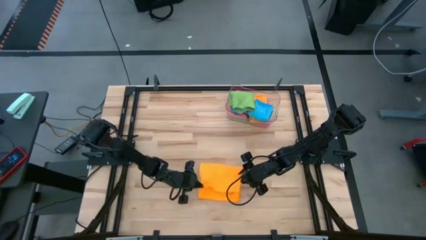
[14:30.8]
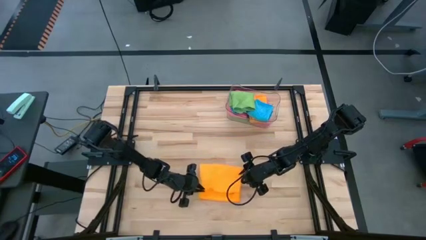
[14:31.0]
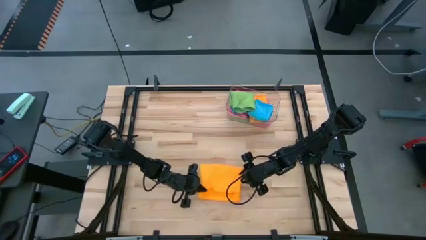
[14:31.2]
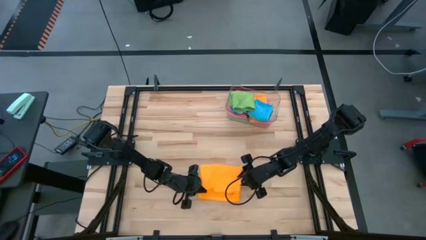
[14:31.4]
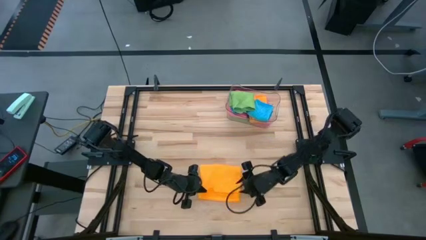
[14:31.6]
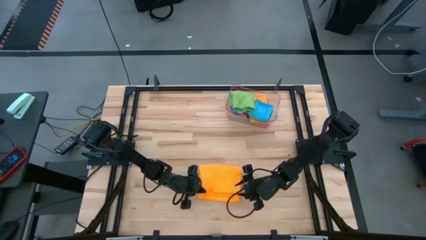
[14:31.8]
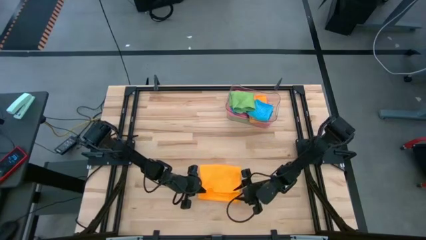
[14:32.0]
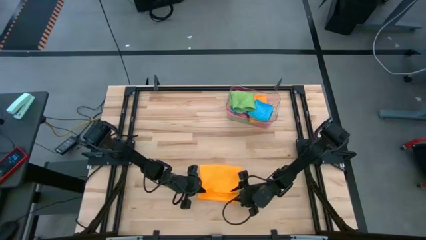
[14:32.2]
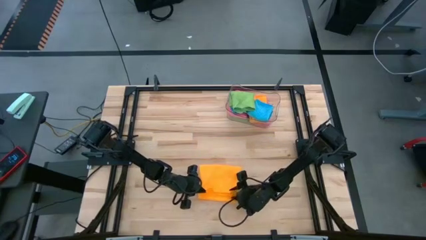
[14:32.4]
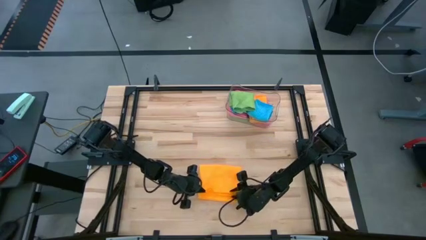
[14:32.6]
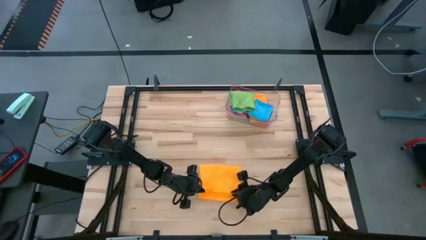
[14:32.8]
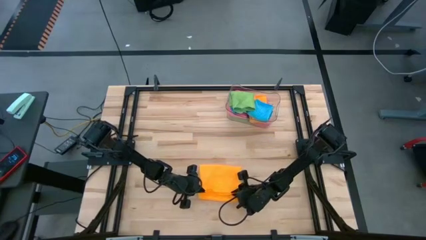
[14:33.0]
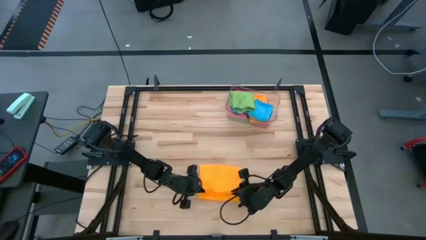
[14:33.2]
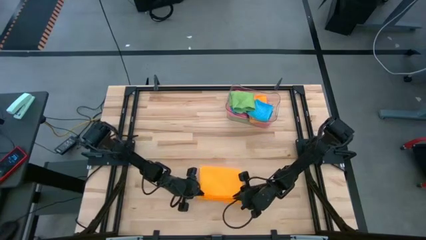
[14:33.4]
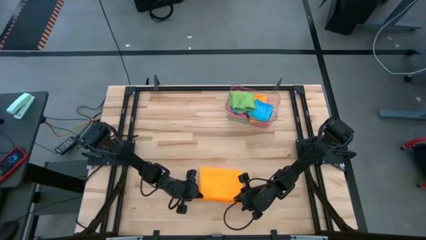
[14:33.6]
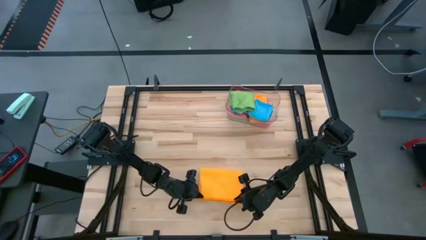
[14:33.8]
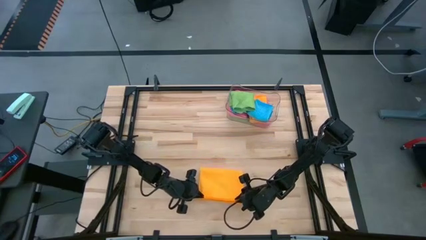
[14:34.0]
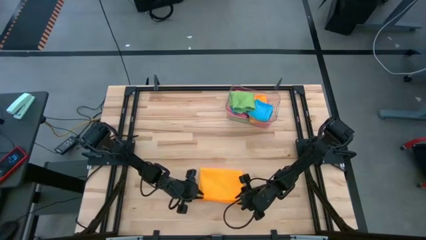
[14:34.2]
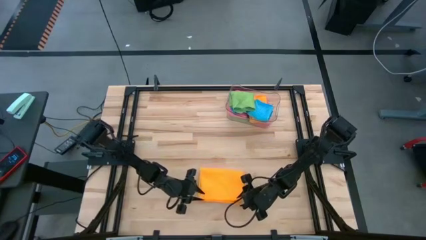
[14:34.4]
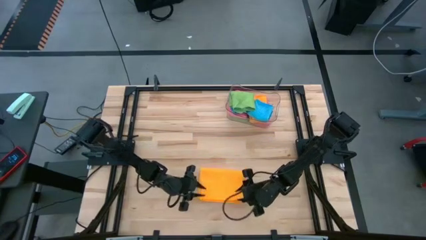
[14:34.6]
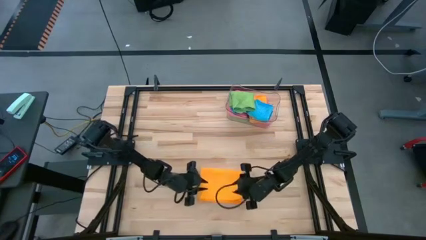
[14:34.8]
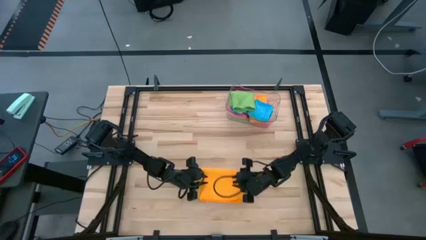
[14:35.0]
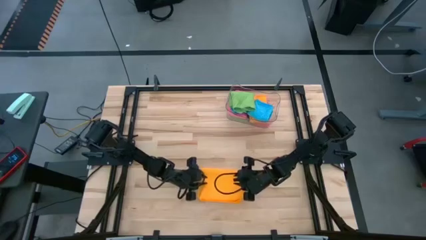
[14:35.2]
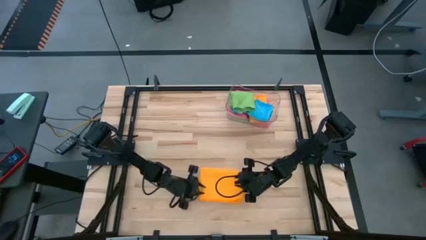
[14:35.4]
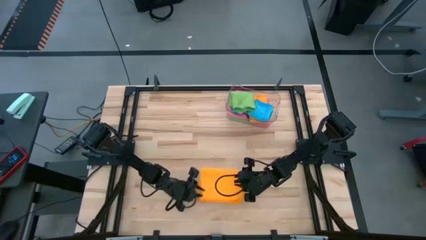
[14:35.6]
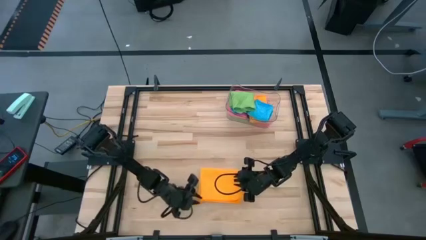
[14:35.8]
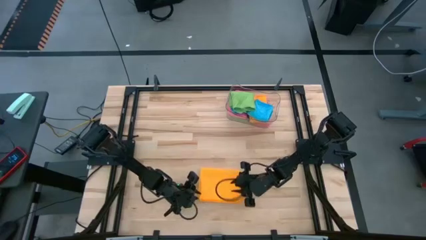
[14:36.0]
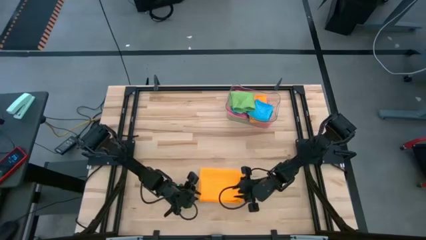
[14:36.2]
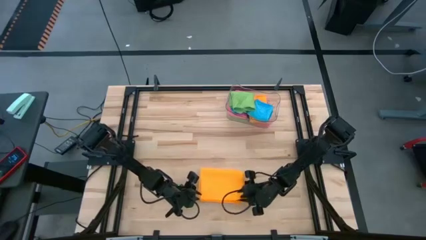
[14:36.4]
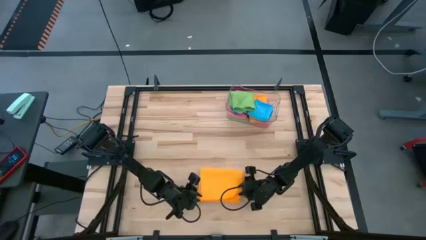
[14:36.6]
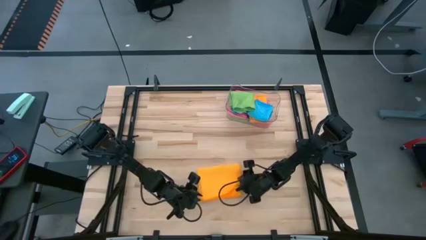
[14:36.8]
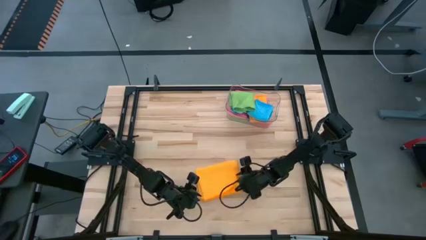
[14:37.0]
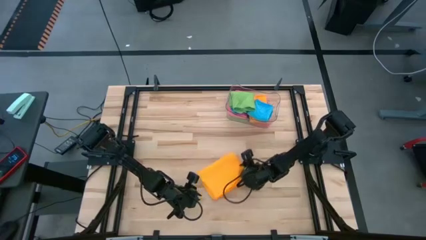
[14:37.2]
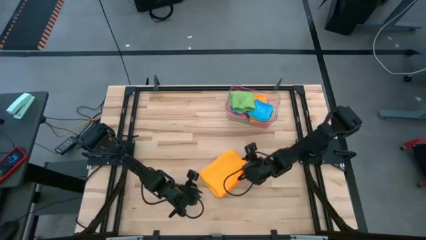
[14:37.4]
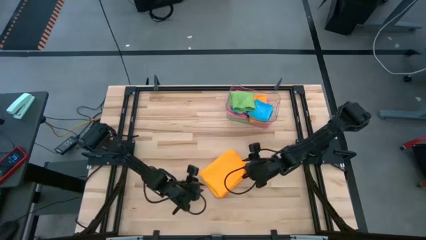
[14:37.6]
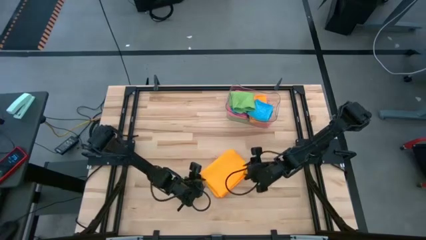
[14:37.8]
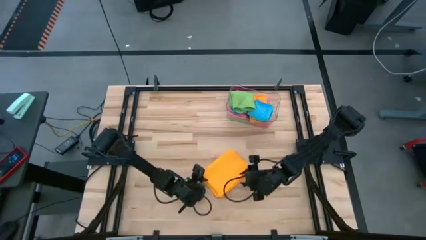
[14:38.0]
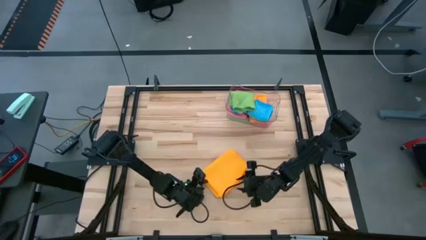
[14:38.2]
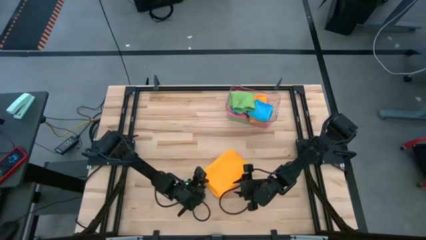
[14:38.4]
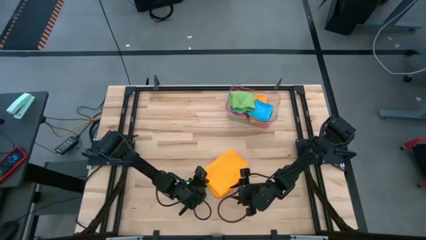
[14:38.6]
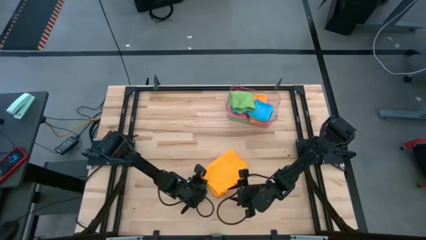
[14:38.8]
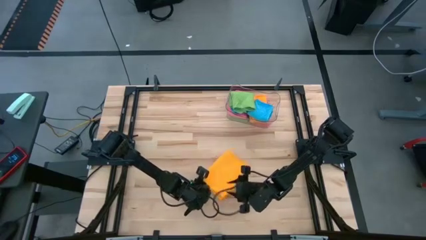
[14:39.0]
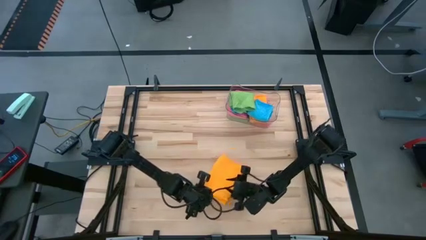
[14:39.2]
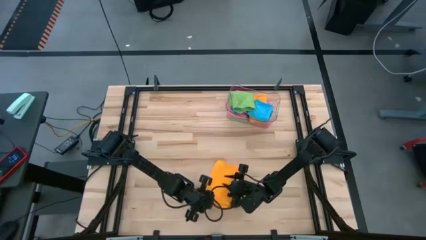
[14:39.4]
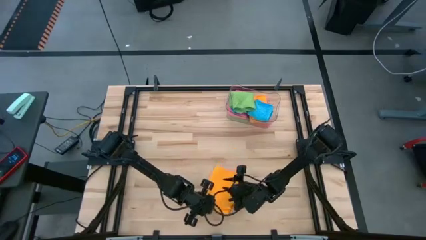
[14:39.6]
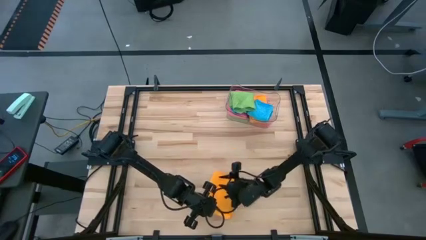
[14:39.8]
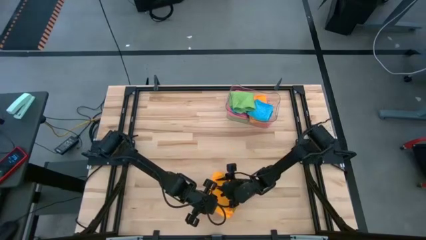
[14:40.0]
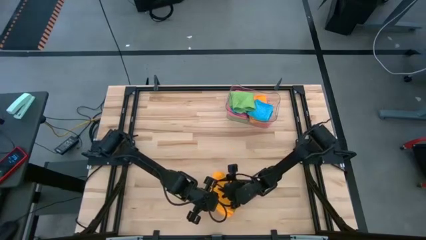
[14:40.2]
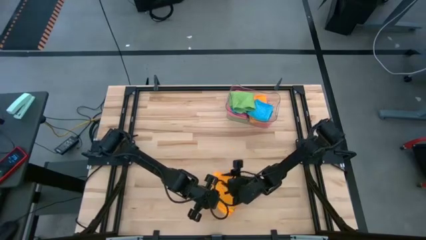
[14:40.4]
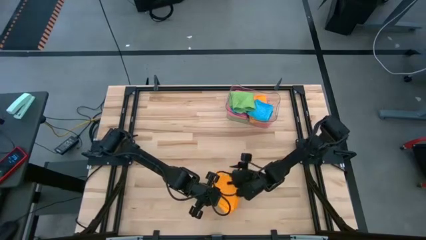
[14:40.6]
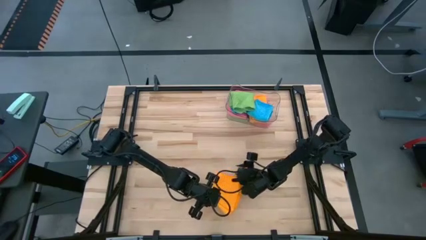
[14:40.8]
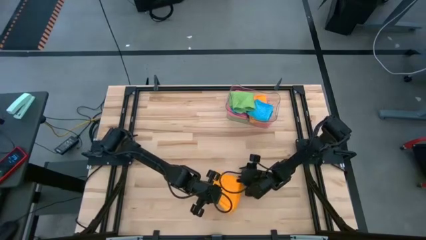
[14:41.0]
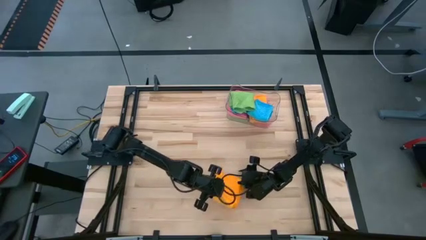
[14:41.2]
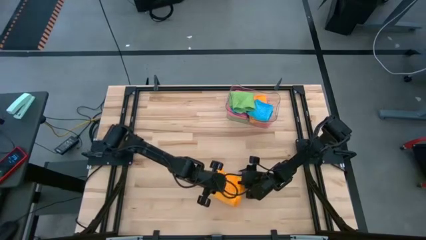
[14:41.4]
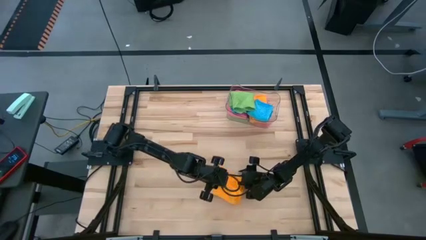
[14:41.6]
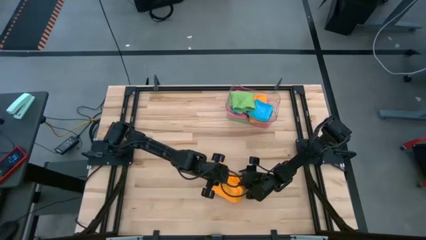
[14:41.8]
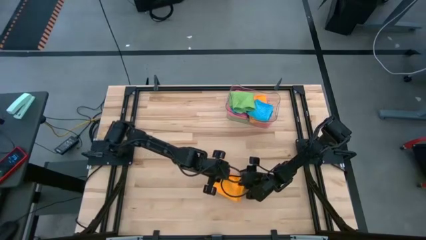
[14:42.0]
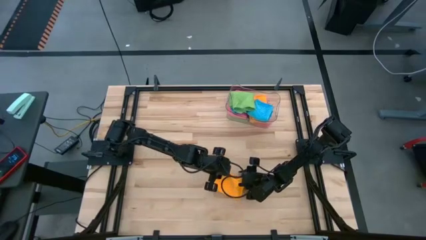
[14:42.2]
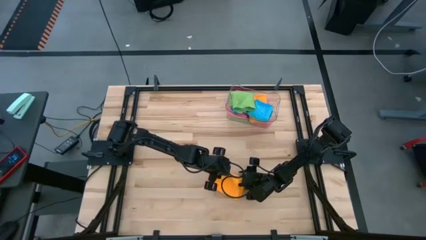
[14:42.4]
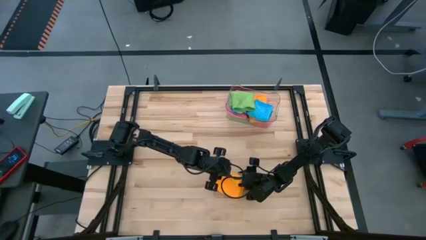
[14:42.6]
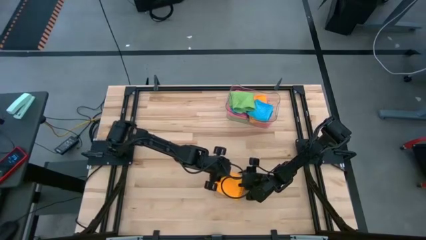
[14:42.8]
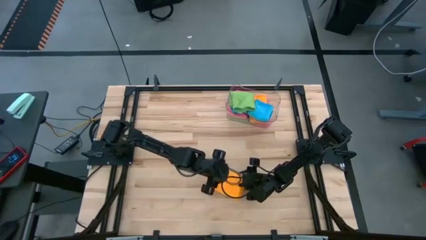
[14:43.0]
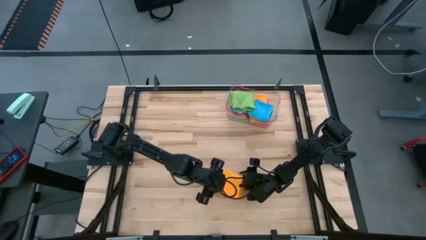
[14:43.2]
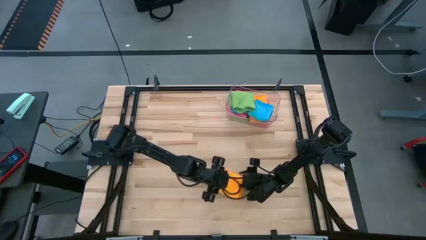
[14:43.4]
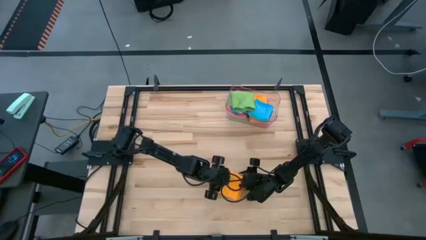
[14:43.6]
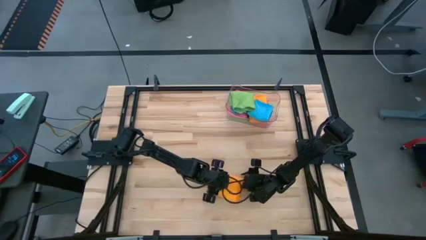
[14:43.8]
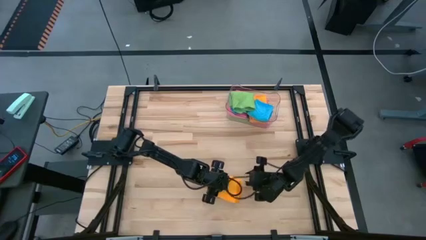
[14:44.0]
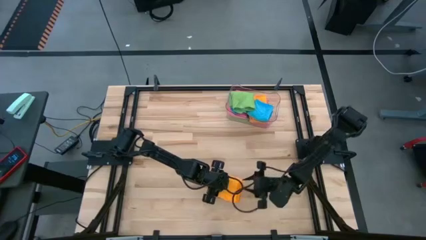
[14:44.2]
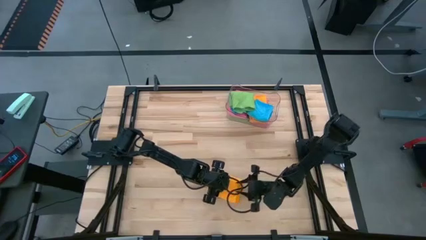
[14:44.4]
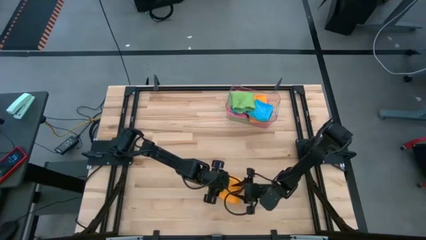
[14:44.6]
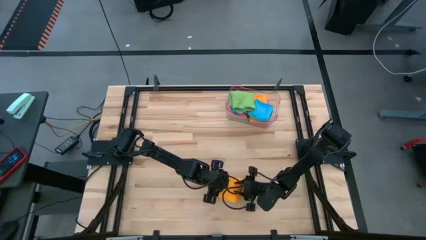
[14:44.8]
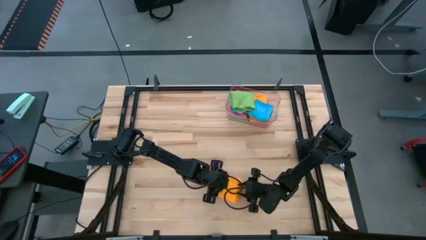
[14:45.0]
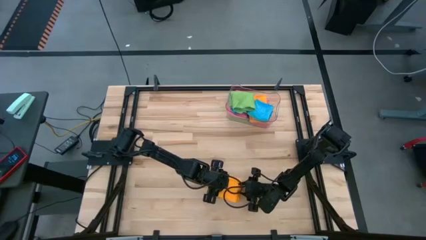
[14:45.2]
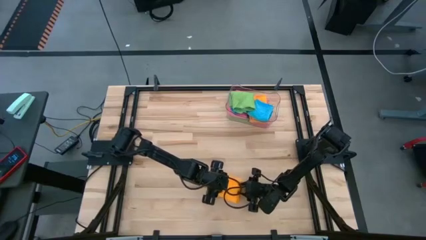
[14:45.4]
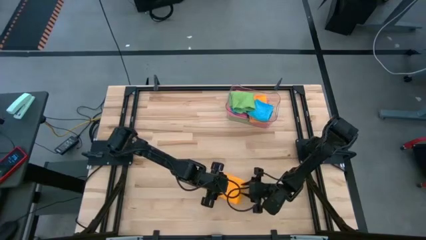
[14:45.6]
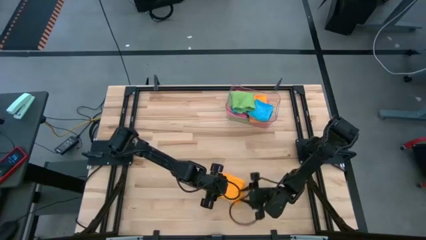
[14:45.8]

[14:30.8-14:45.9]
Task: Fold microfiber towels
Fold the yellow towel
